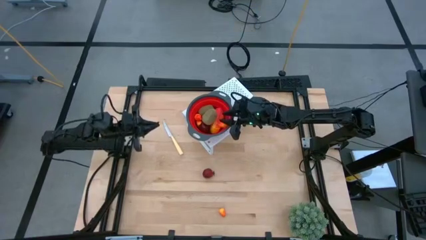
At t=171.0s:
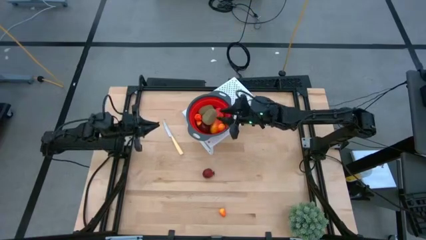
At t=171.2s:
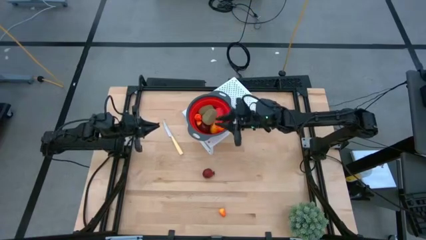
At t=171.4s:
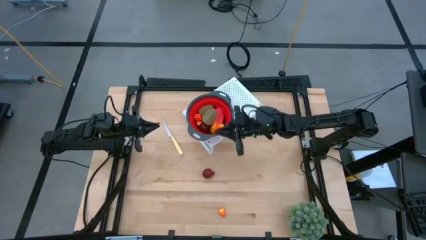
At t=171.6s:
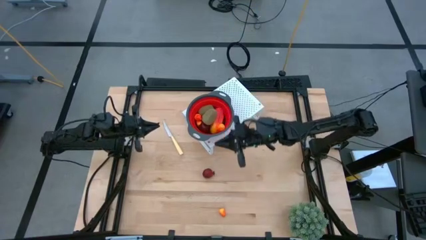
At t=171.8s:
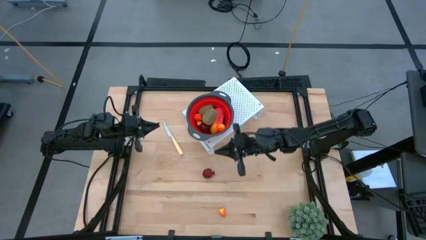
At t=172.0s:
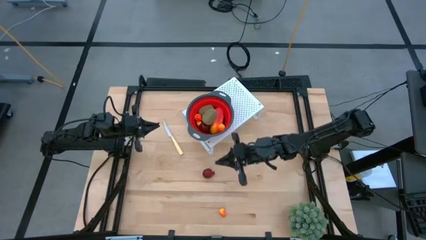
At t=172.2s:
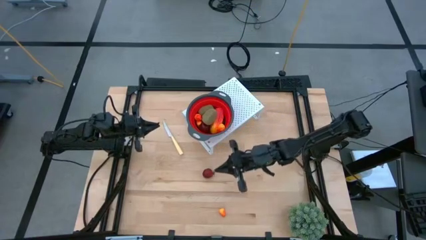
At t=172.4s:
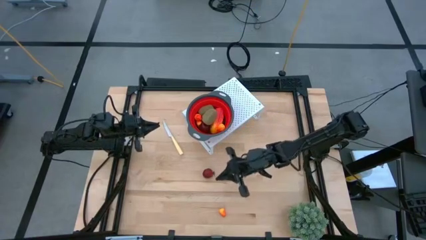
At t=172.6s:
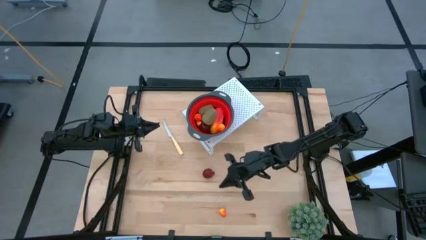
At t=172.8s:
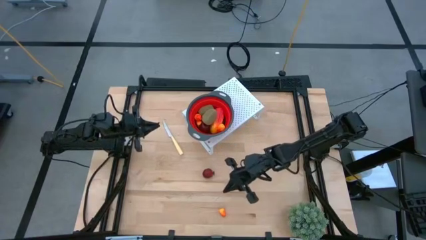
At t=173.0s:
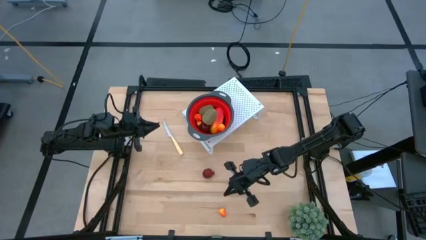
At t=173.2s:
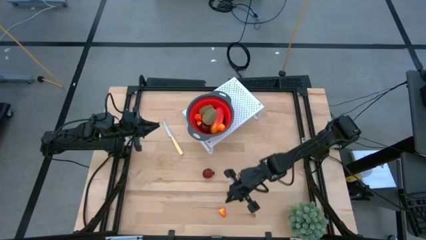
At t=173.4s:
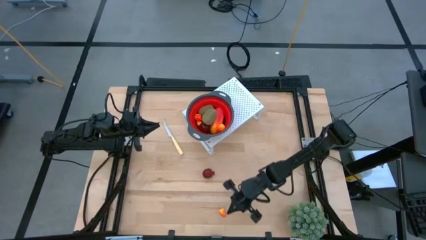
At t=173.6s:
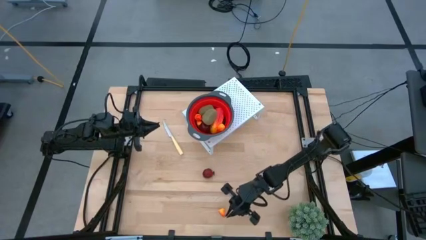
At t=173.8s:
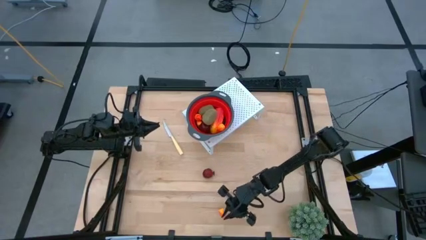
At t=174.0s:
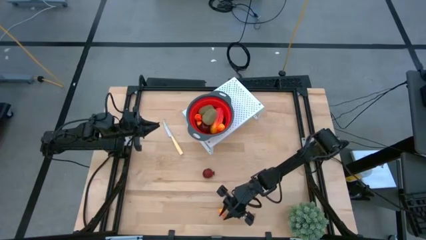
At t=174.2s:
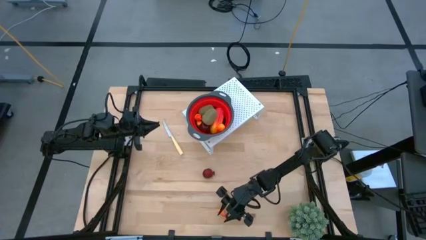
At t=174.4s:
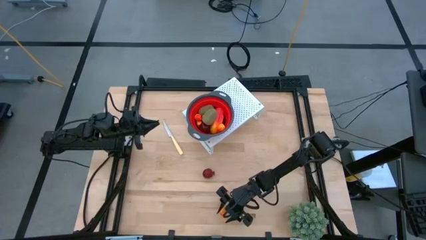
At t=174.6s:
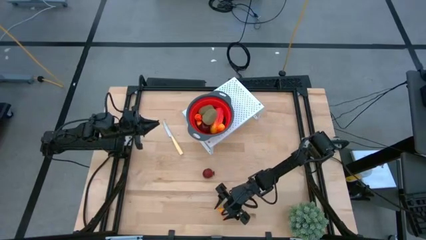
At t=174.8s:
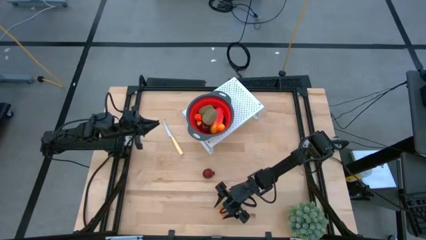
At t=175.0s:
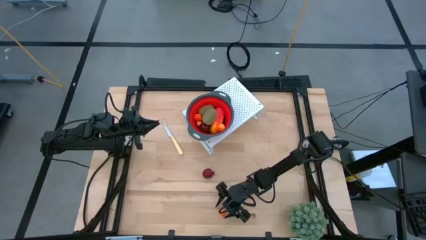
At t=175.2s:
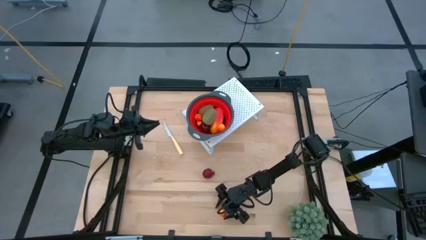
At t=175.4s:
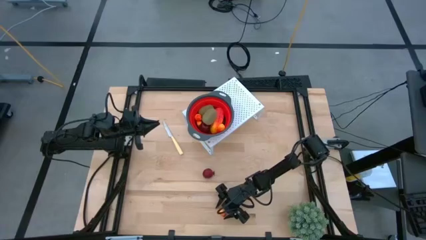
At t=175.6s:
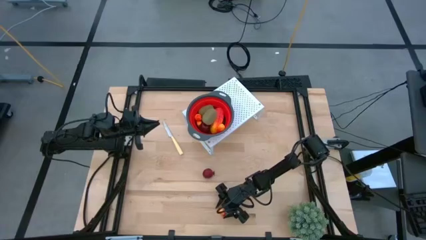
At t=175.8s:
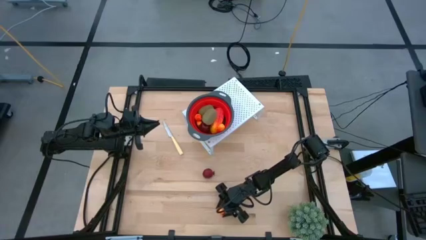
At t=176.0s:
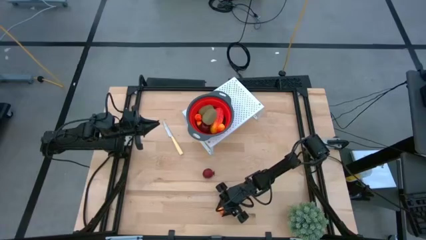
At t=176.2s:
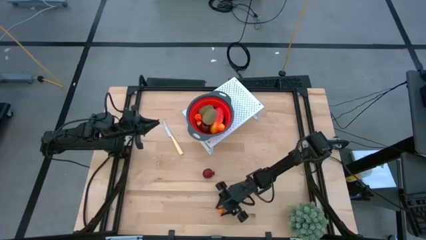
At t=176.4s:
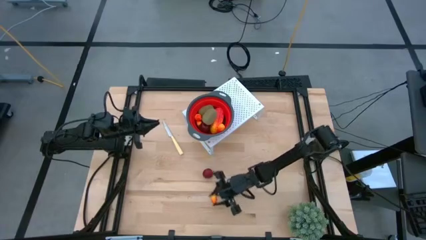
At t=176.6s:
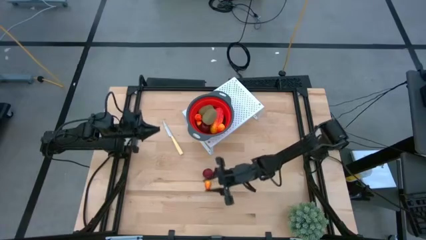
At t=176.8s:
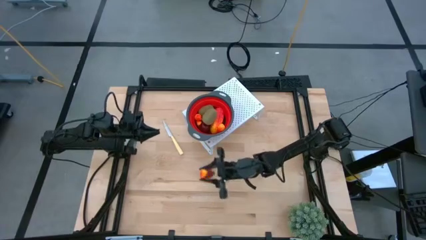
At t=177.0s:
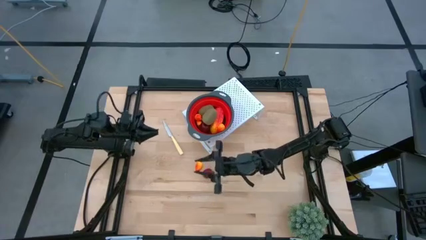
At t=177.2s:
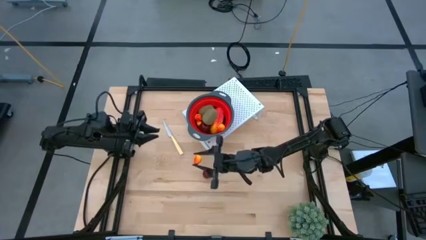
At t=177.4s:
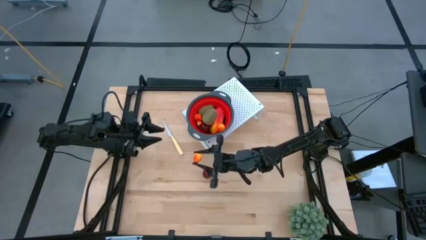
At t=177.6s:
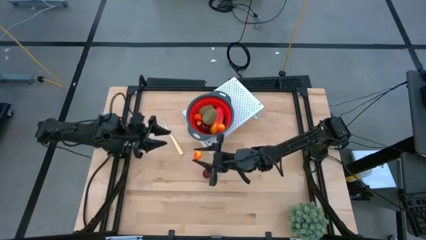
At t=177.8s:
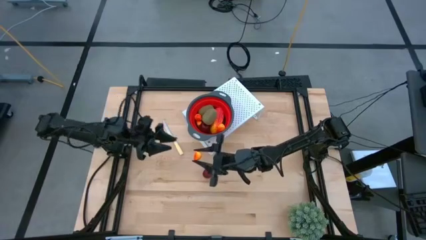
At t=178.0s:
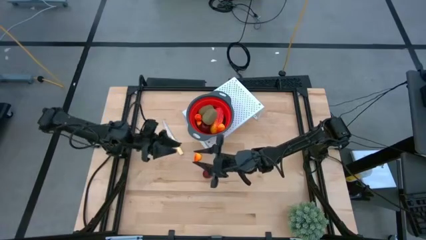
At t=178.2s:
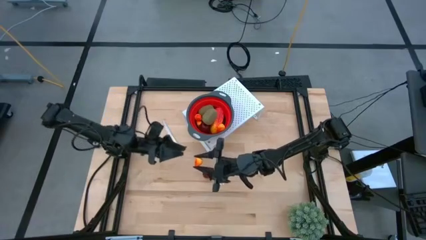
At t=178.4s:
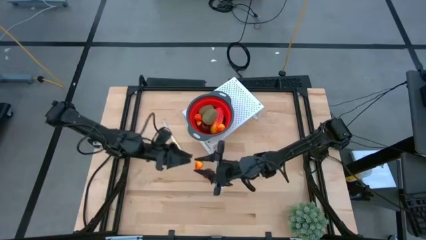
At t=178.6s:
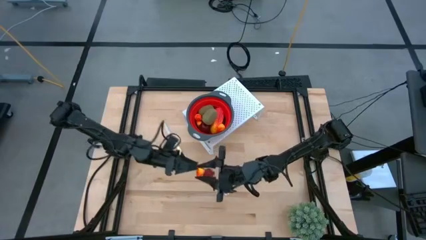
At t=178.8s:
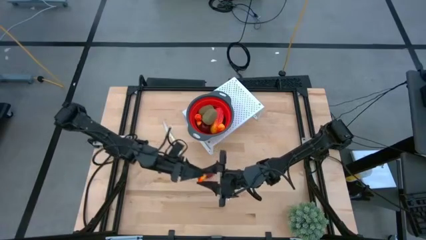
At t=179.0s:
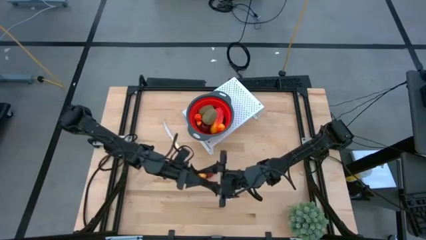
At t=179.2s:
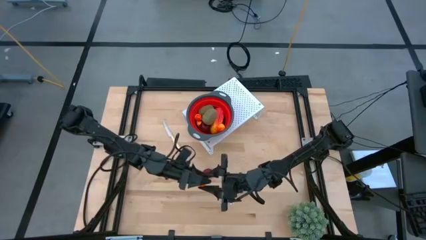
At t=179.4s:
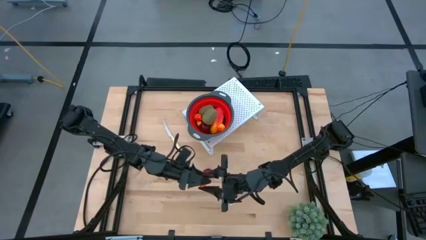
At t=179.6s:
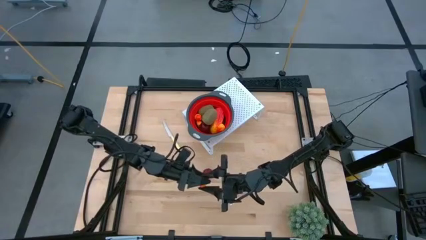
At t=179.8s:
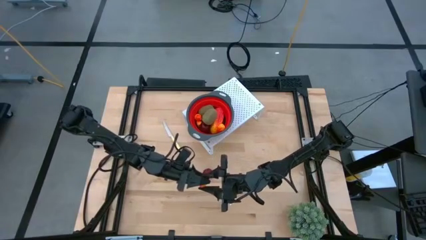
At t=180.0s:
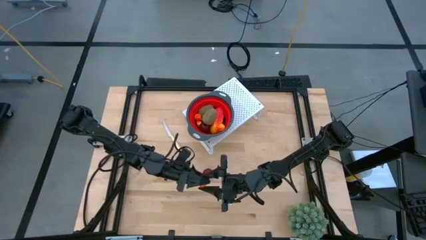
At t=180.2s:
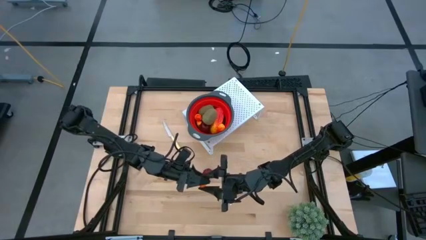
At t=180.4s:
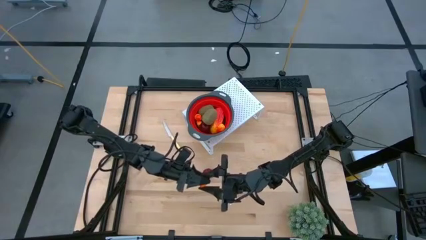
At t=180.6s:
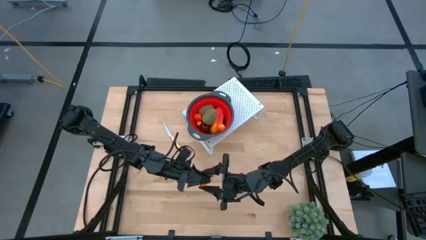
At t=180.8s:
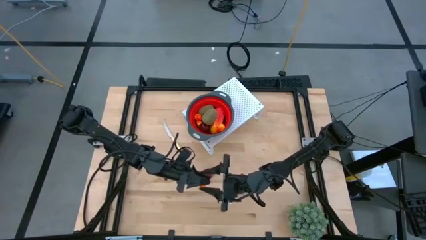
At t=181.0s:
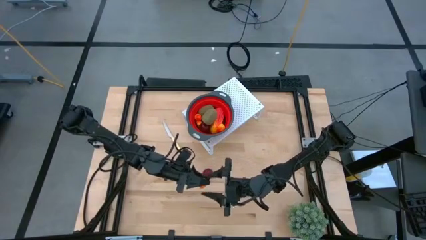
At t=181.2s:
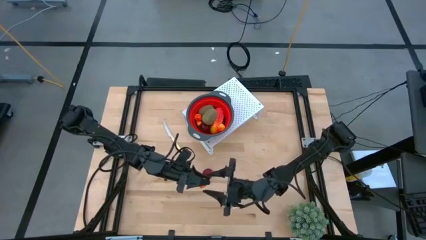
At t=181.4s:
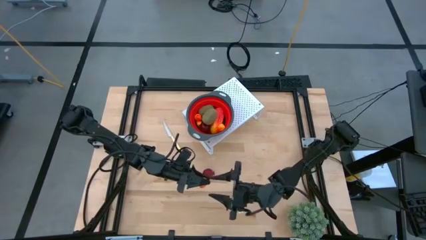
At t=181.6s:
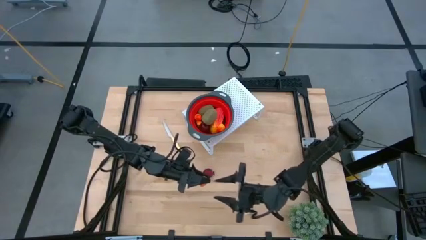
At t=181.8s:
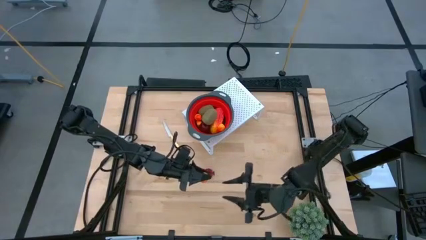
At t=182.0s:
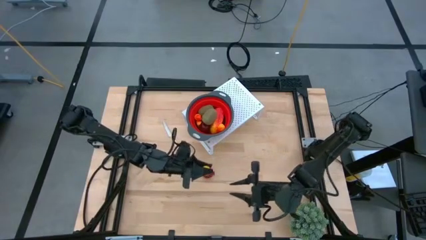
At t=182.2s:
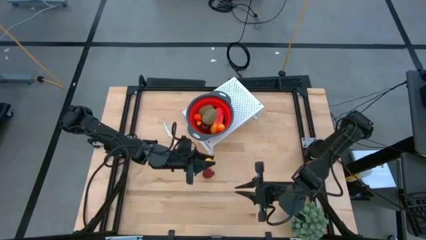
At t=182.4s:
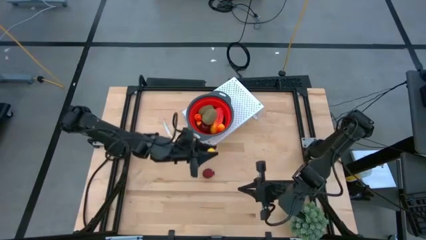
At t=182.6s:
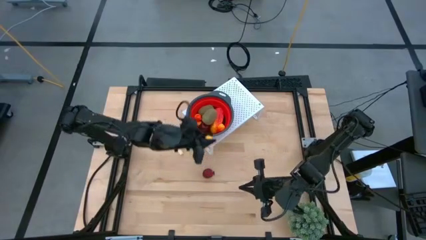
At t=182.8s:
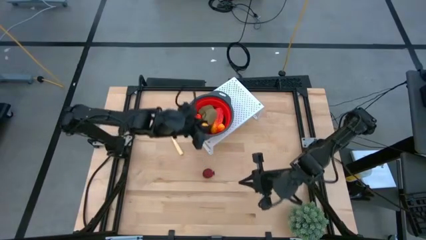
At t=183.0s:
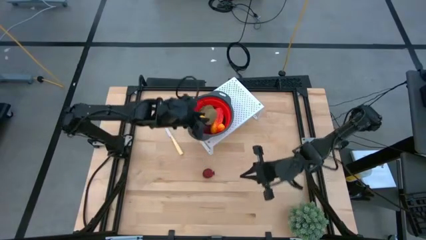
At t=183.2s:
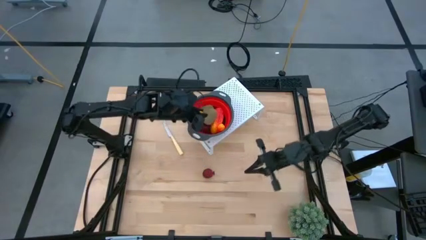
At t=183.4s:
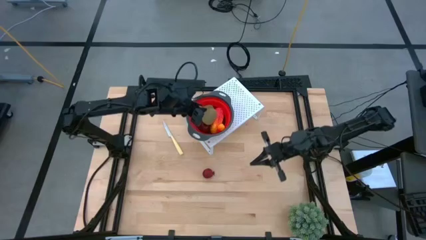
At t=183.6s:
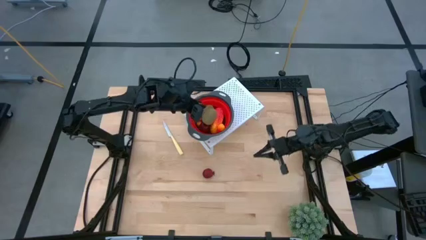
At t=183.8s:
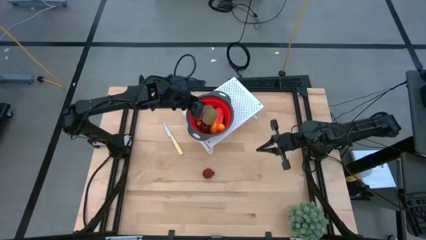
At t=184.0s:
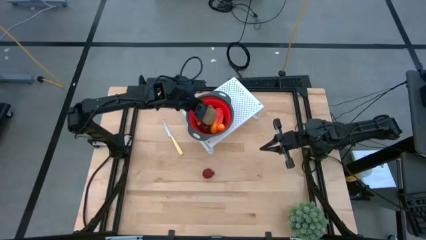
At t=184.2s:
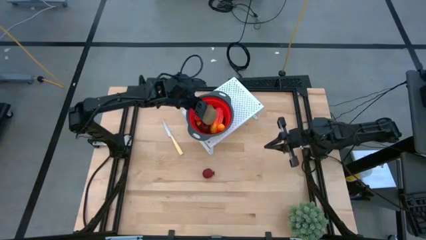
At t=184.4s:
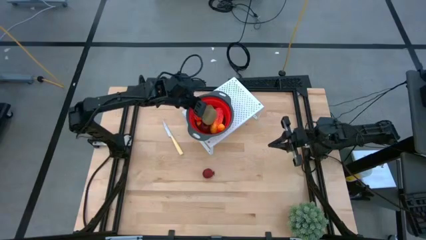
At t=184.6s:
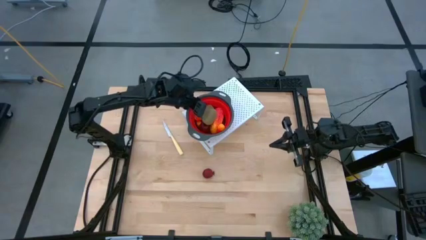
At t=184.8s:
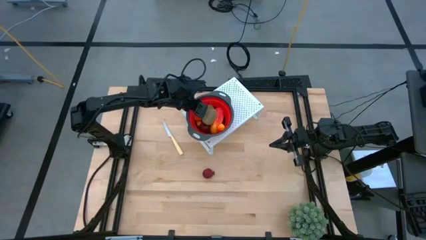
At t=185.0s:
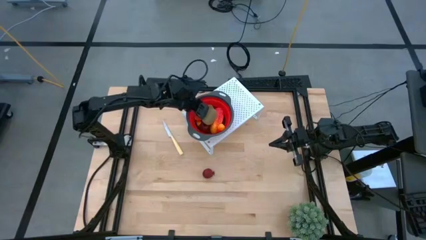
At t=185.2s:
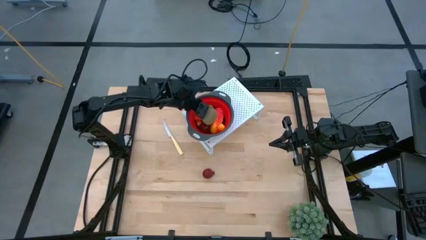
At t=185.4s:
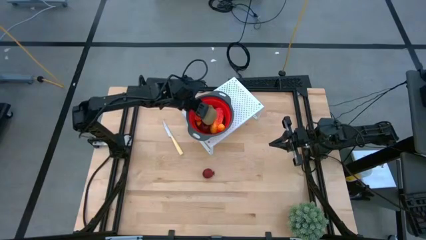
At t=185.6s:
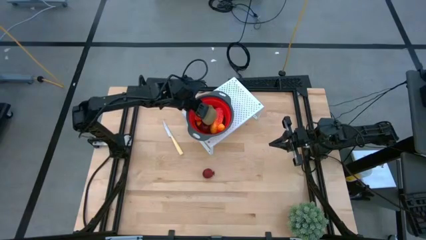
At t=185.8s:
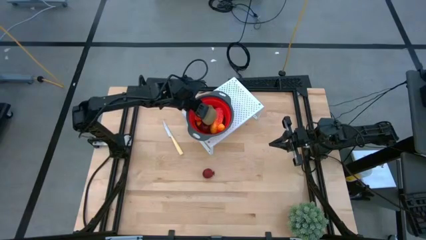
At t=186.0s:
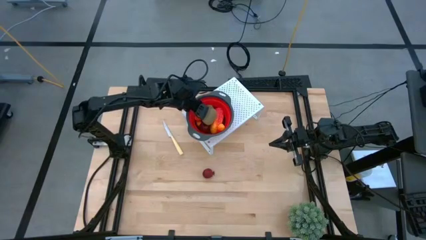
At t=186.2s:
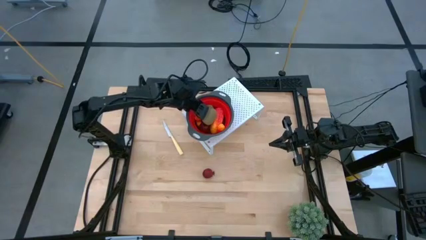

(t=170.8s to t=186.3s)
Task: Pick & Place Fruit
Put the peach into the red strainer bowl on the shelf
